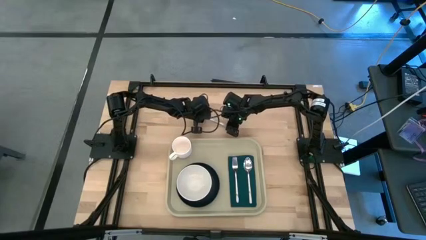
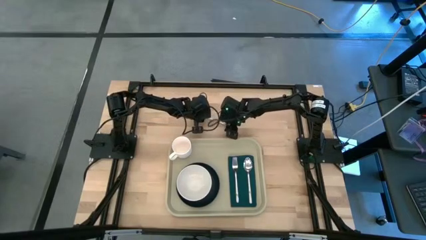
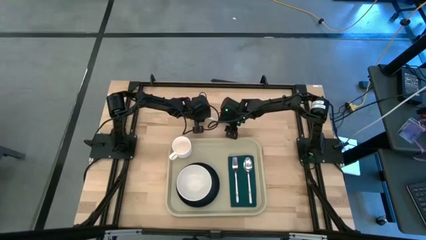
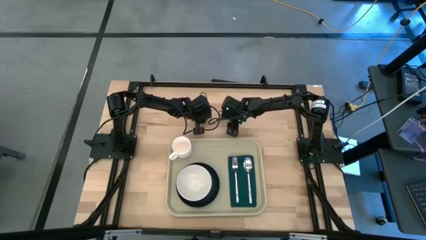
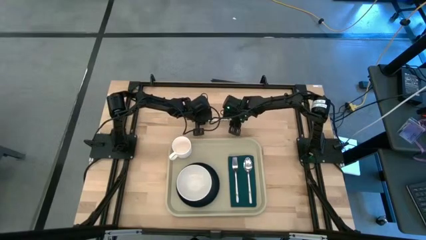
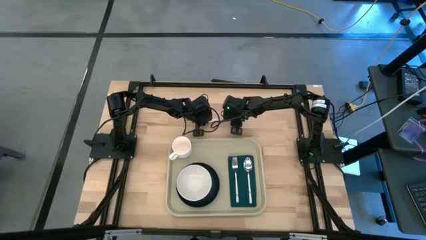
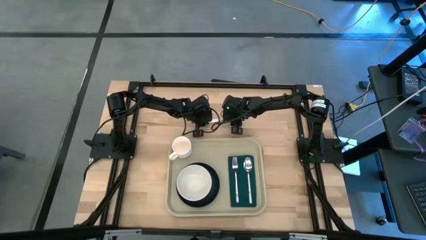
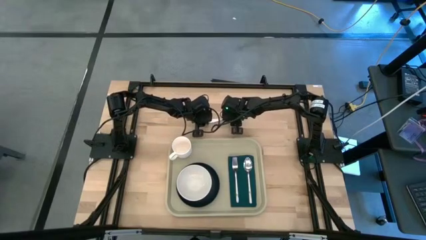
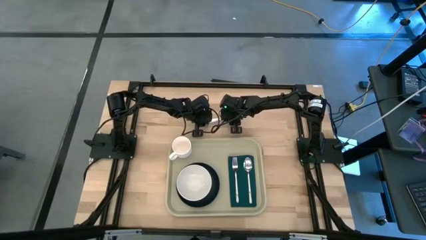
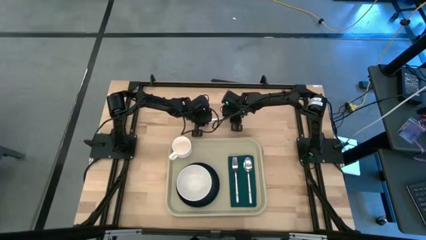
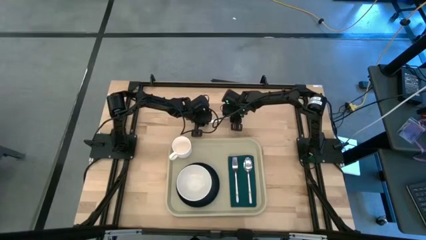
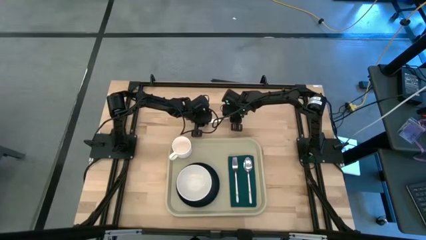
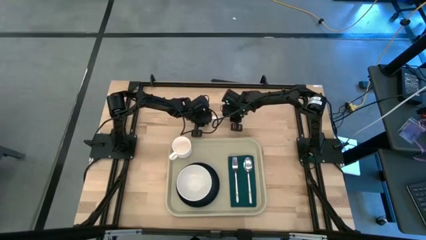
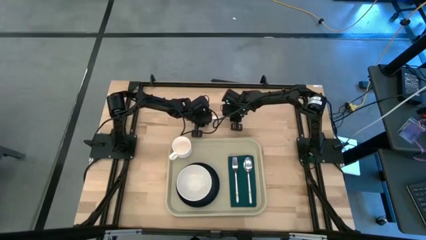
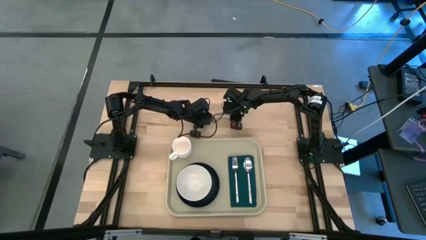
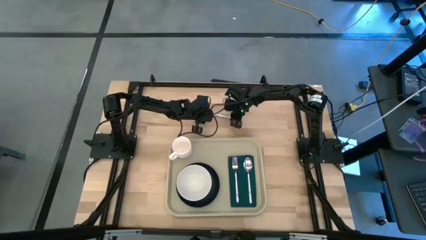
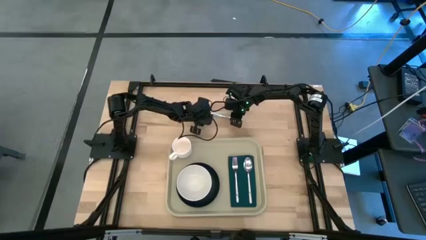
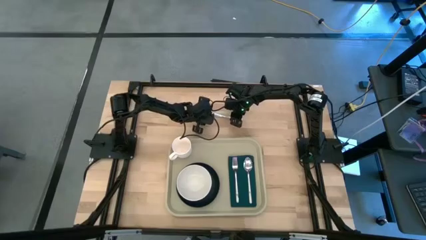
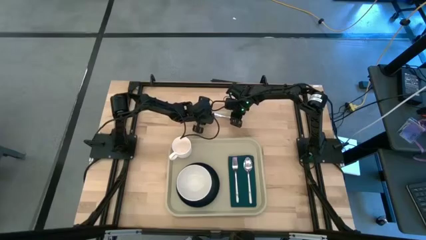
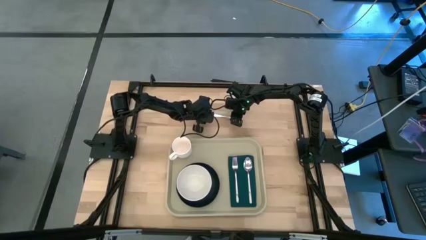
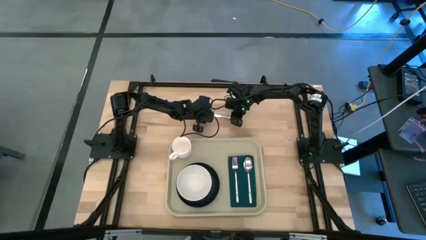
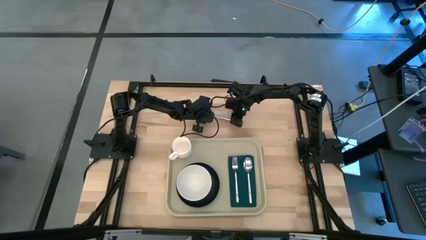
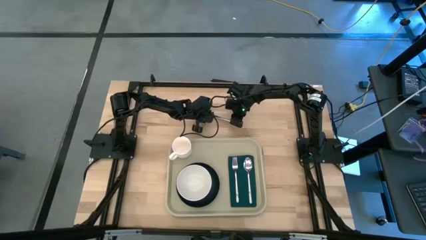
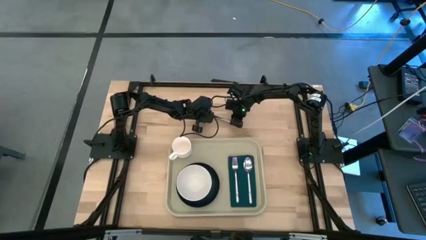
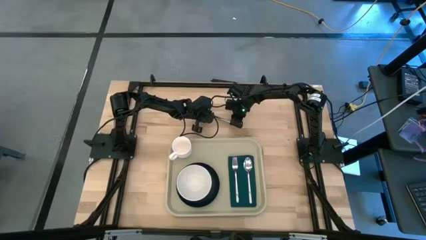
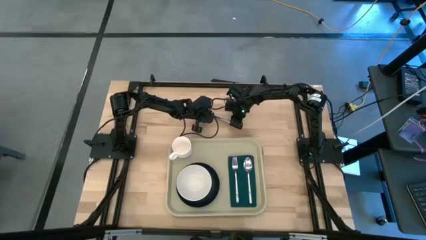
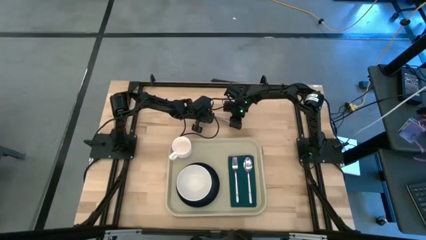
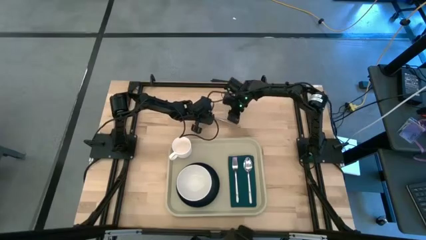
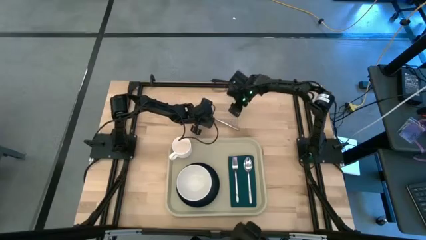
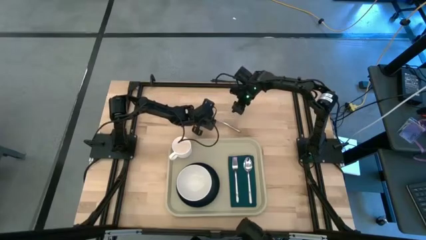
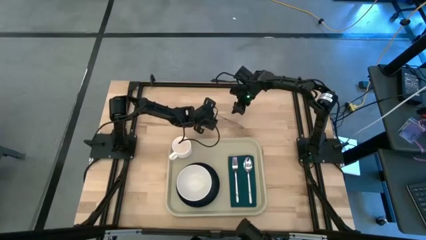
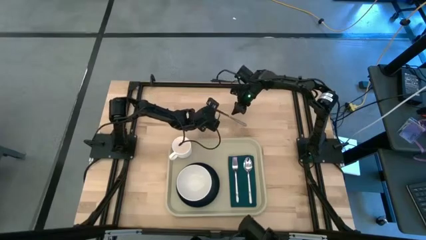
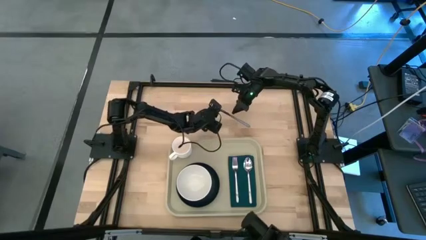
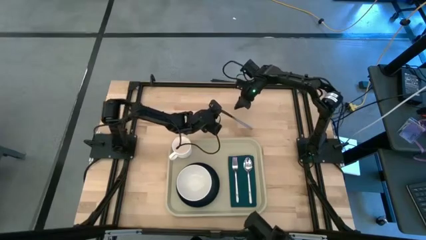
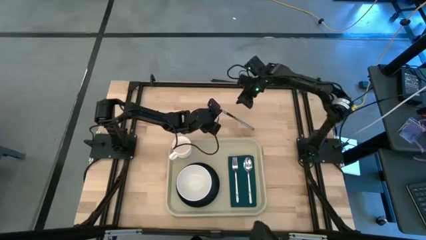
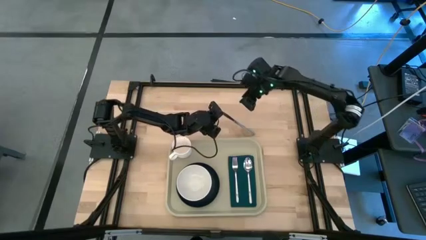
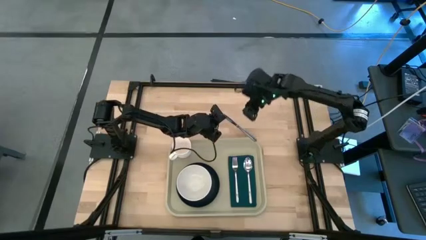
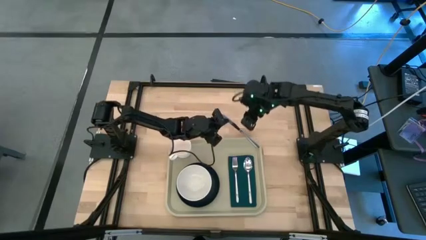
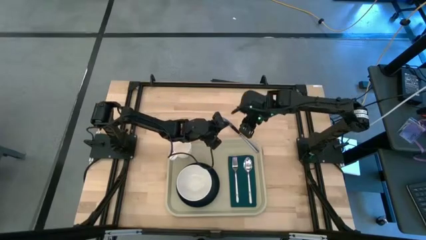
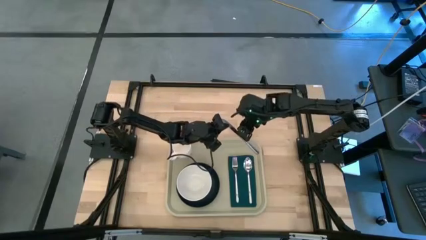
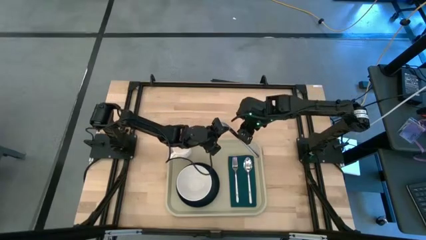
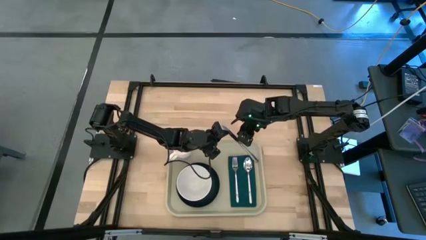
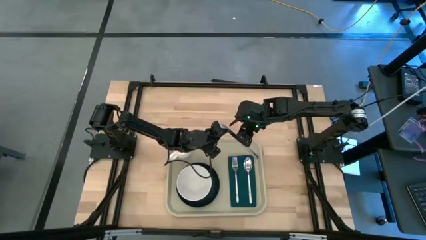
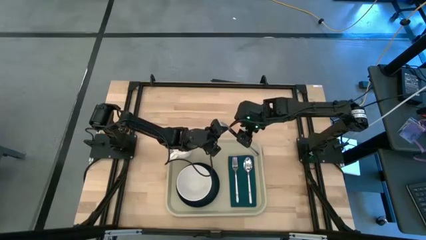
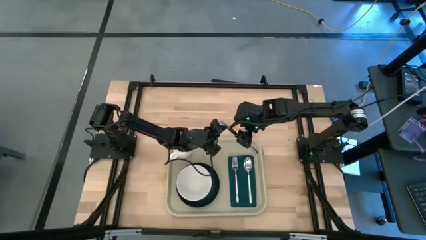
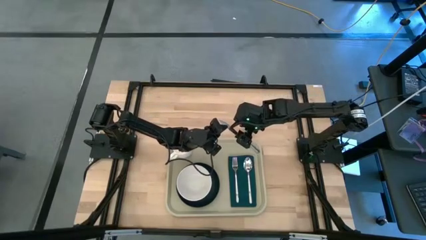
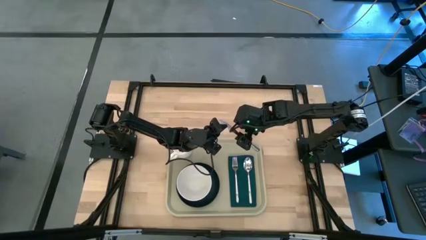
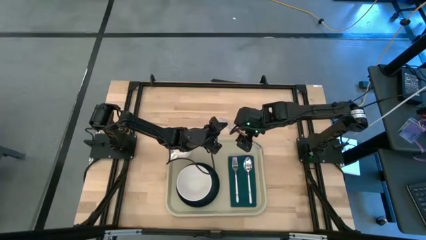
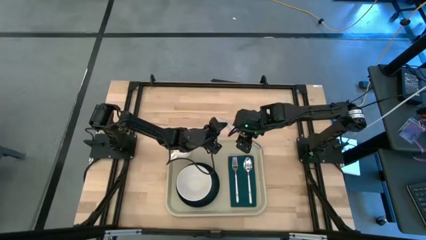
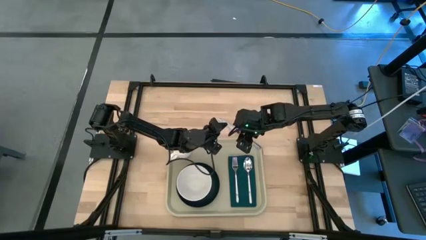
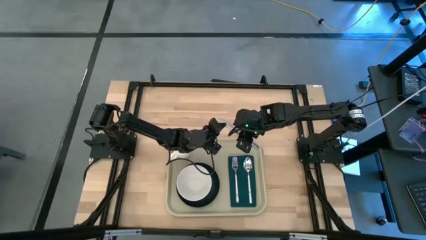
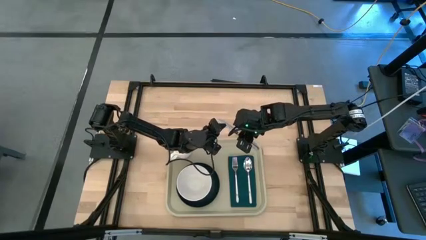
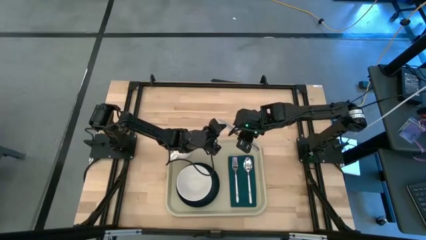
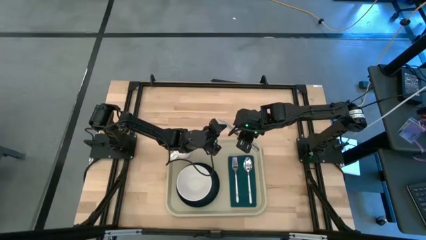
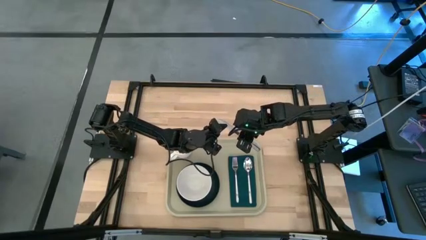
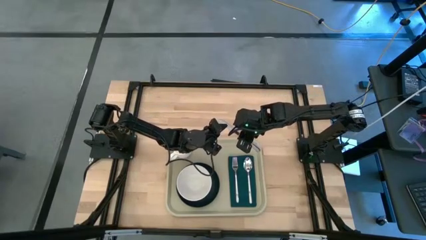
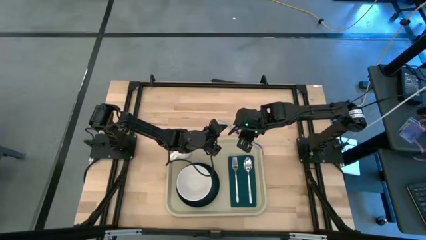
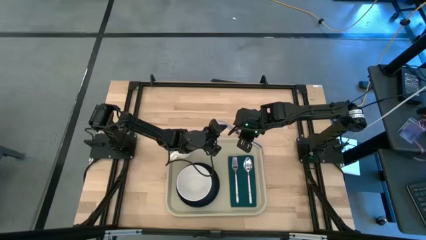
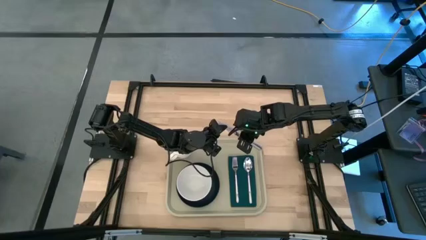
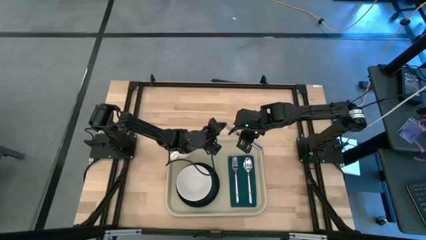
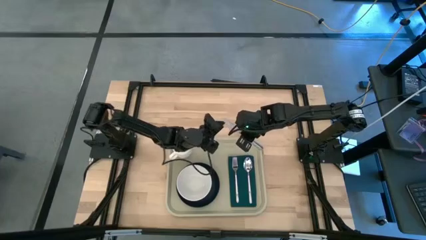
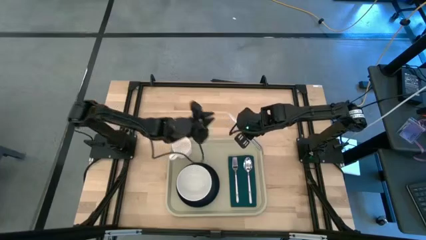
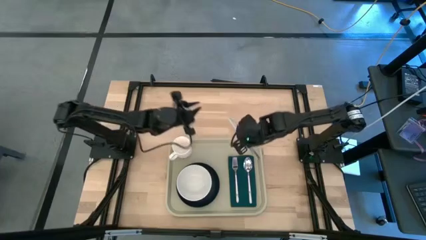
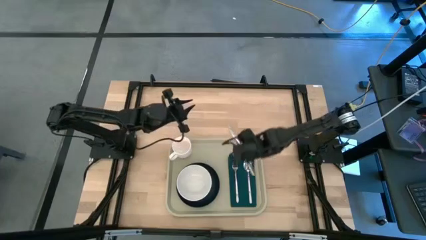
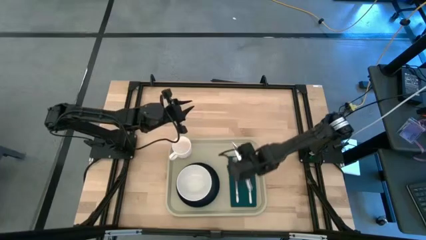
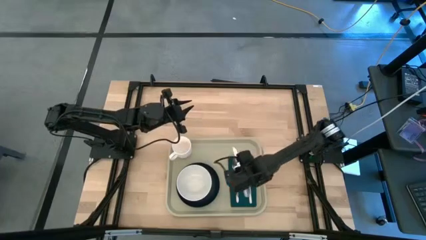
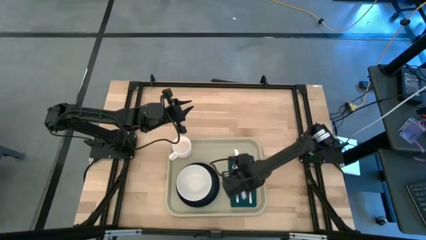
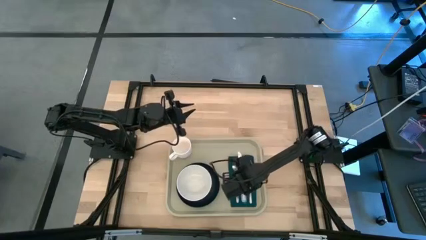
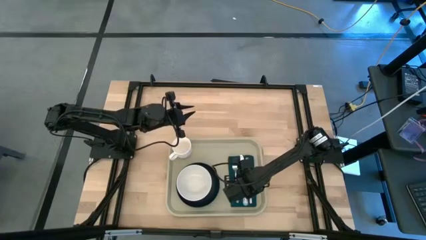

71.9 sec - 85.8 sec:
Task: Set up tray
Put the silver knife on the green napkin between the silver fork and spoon
